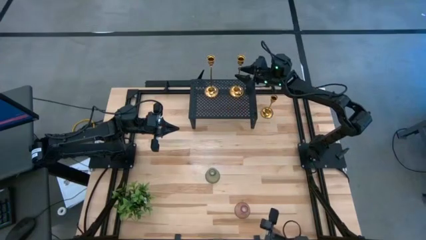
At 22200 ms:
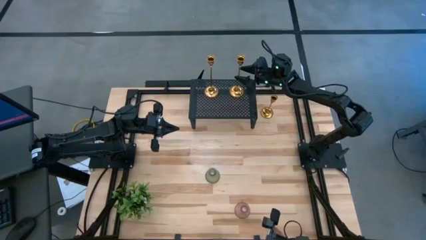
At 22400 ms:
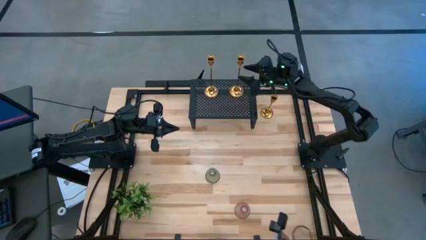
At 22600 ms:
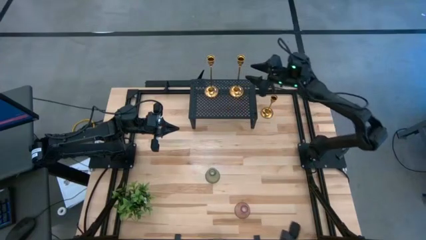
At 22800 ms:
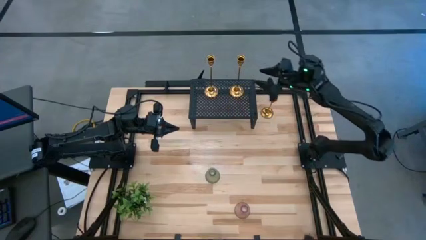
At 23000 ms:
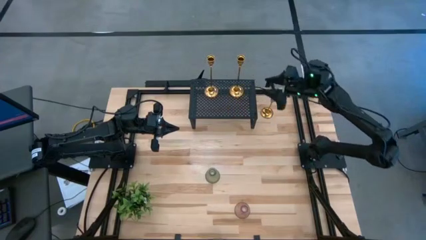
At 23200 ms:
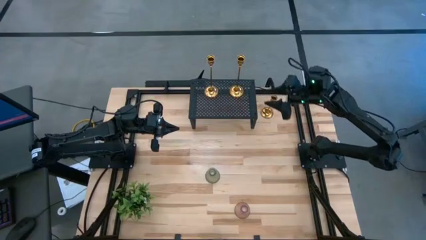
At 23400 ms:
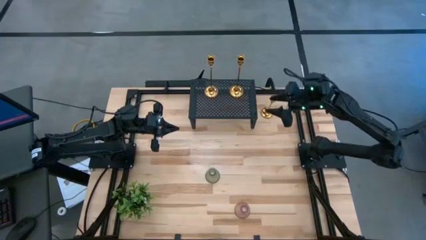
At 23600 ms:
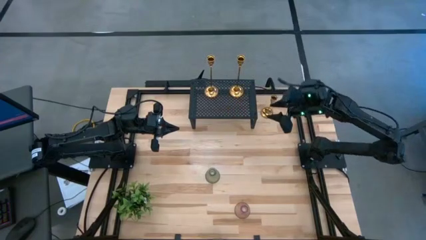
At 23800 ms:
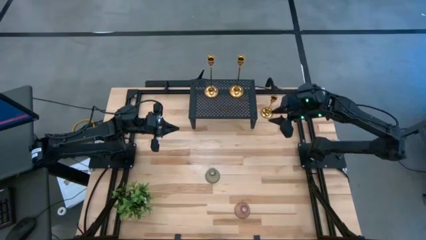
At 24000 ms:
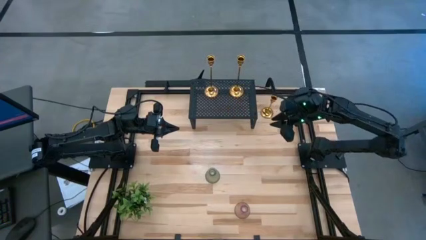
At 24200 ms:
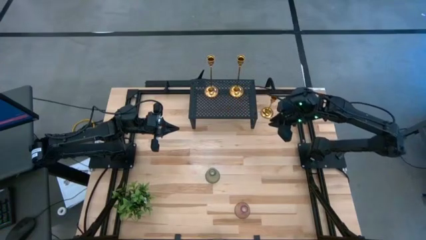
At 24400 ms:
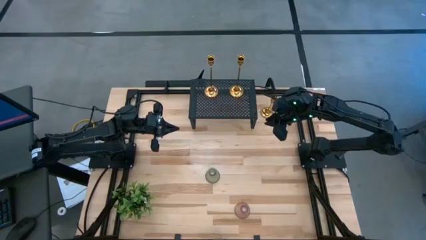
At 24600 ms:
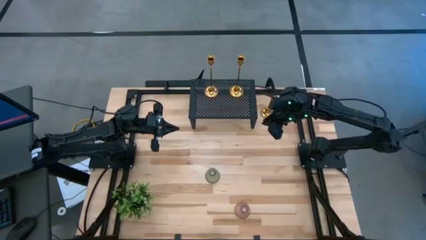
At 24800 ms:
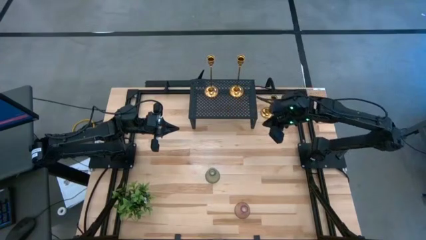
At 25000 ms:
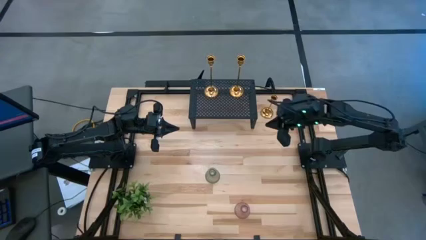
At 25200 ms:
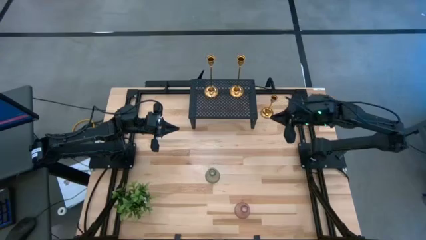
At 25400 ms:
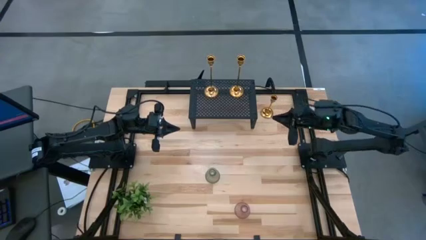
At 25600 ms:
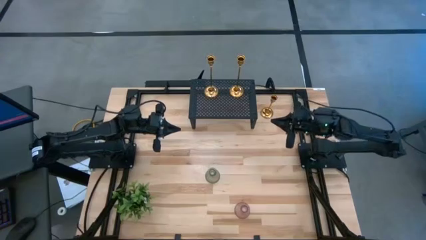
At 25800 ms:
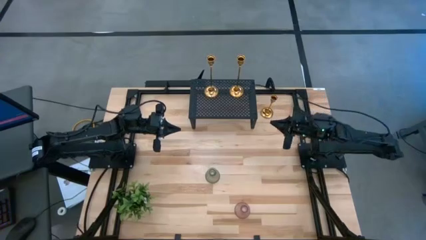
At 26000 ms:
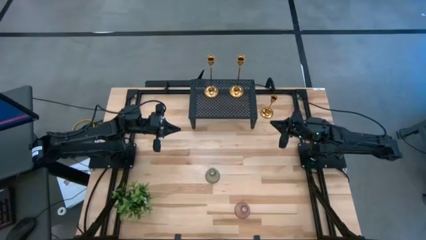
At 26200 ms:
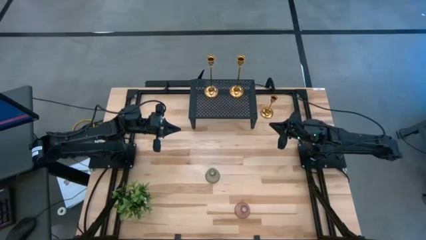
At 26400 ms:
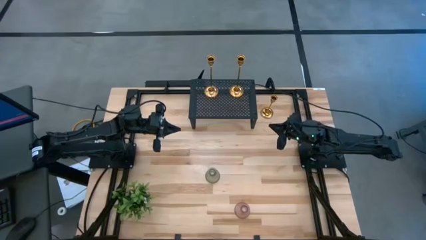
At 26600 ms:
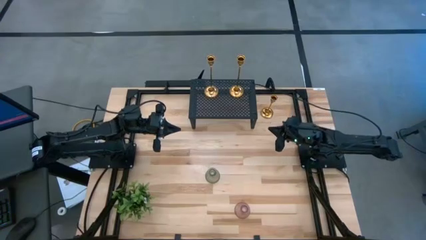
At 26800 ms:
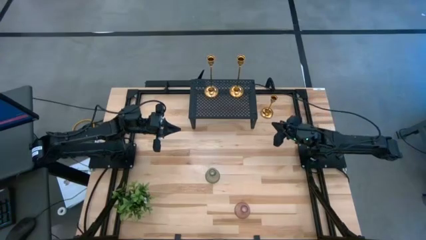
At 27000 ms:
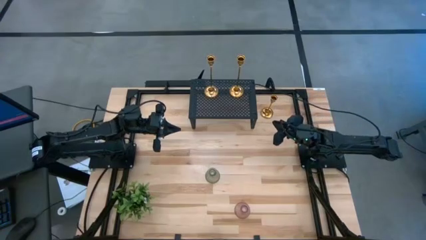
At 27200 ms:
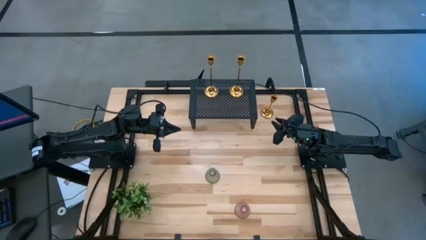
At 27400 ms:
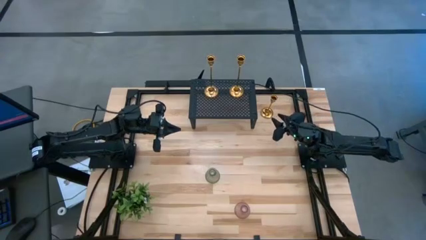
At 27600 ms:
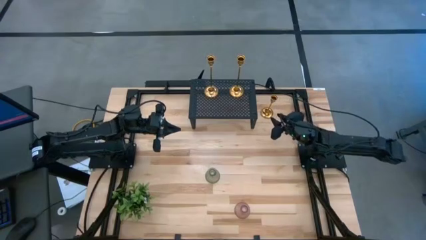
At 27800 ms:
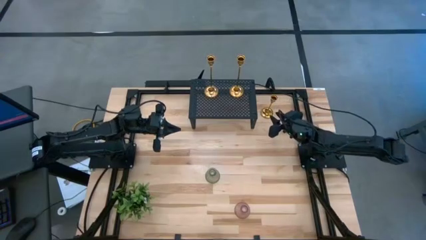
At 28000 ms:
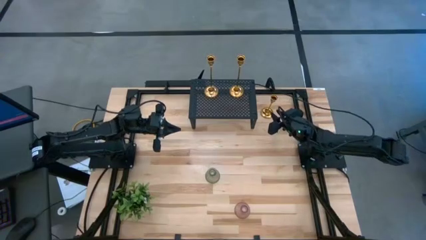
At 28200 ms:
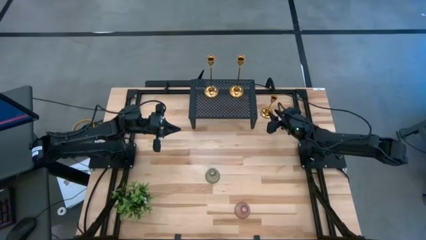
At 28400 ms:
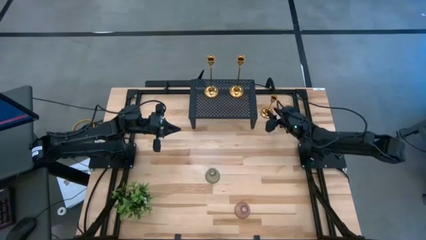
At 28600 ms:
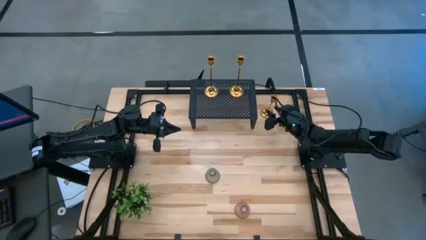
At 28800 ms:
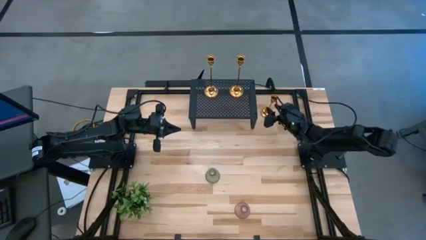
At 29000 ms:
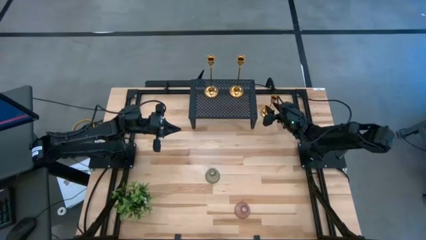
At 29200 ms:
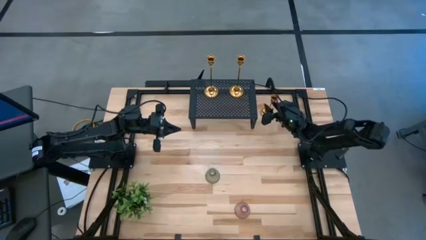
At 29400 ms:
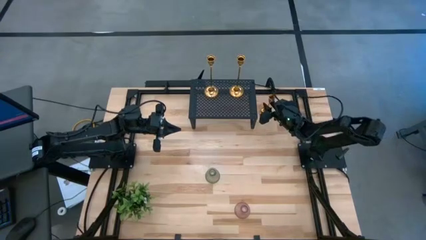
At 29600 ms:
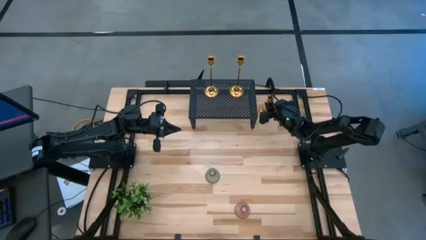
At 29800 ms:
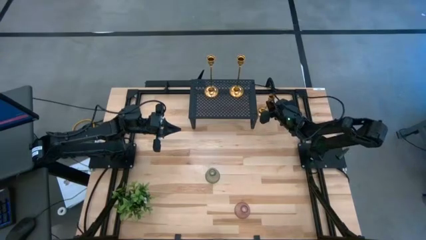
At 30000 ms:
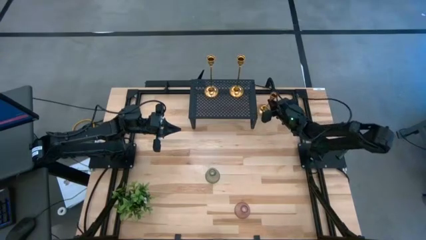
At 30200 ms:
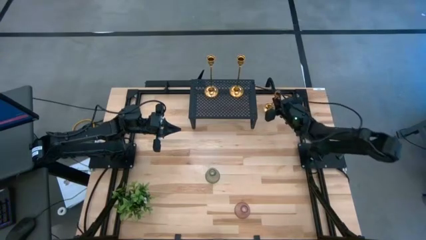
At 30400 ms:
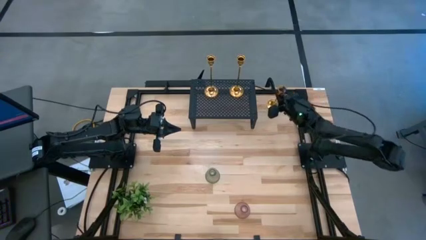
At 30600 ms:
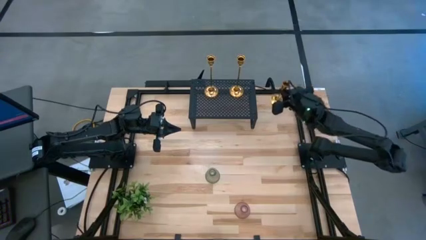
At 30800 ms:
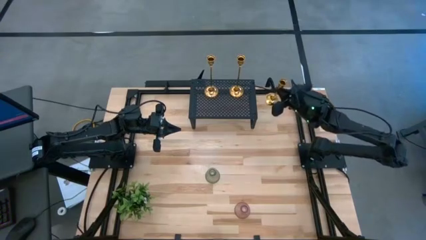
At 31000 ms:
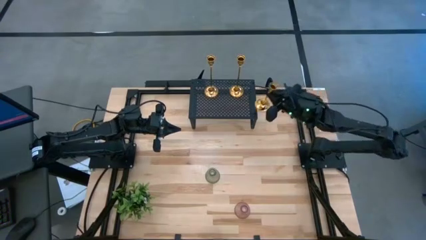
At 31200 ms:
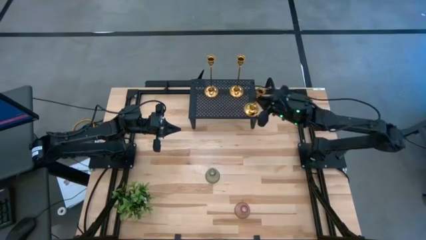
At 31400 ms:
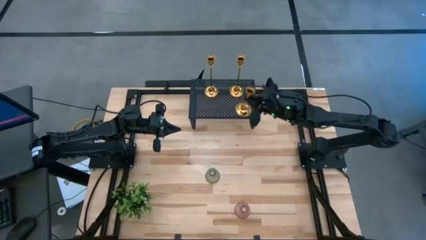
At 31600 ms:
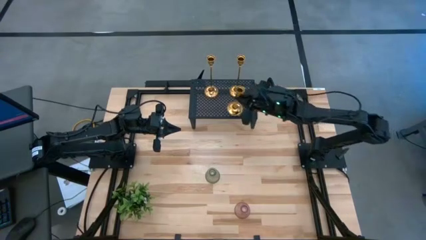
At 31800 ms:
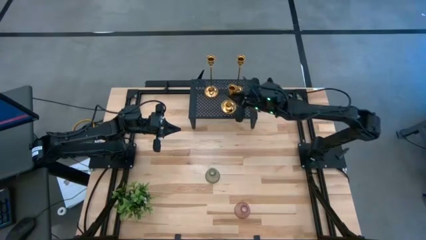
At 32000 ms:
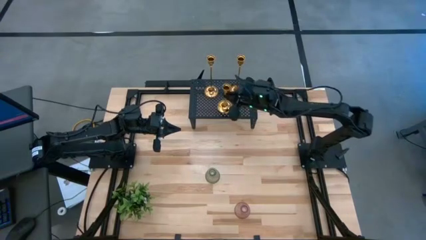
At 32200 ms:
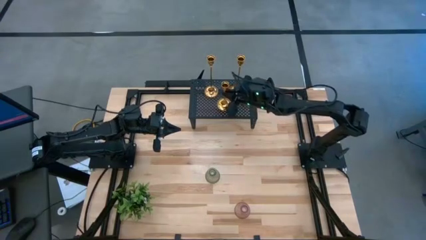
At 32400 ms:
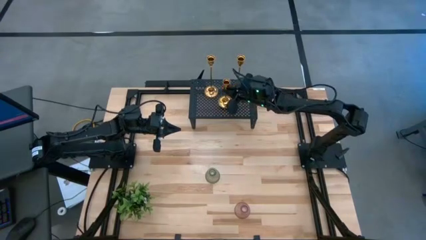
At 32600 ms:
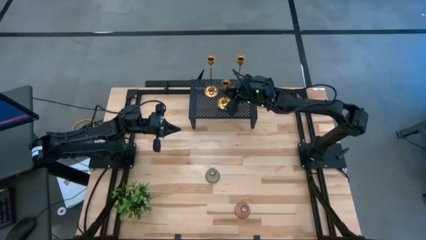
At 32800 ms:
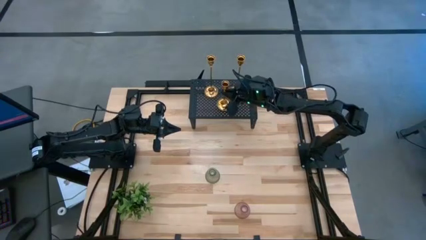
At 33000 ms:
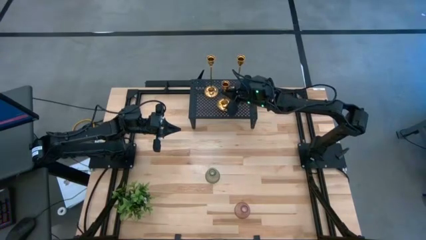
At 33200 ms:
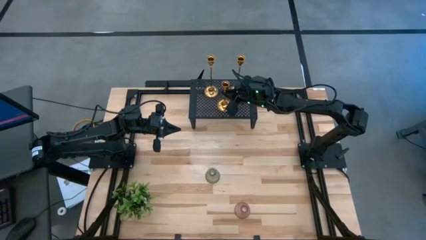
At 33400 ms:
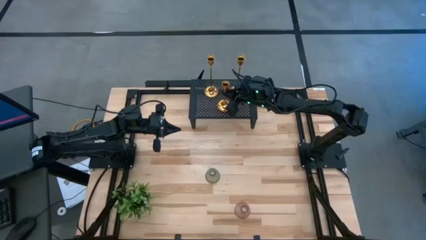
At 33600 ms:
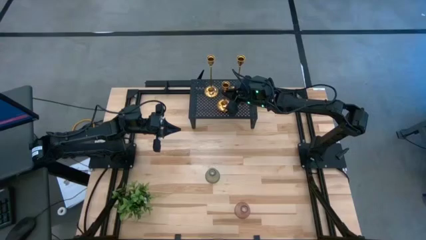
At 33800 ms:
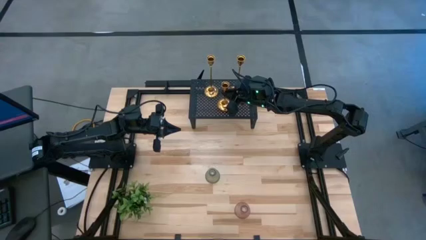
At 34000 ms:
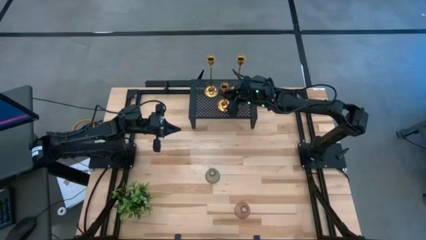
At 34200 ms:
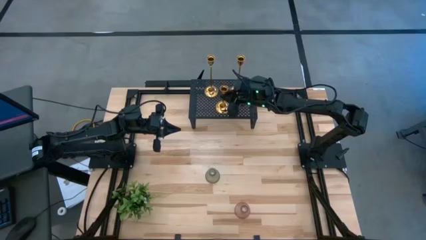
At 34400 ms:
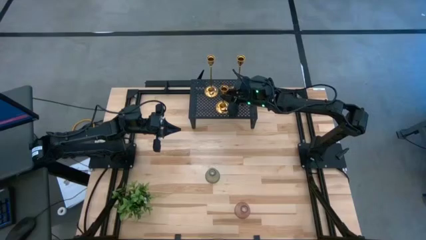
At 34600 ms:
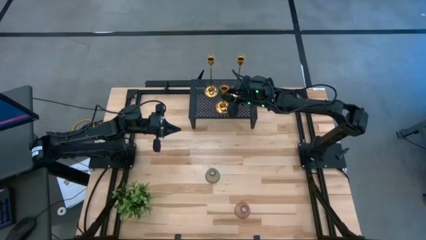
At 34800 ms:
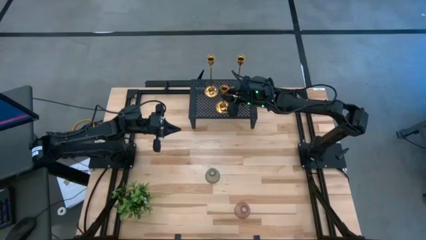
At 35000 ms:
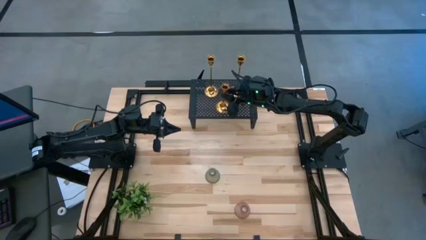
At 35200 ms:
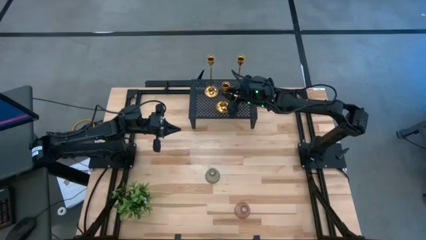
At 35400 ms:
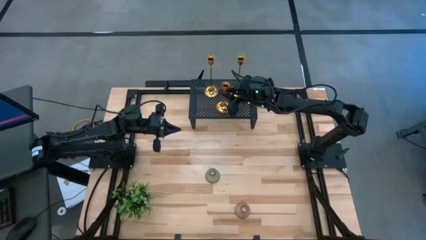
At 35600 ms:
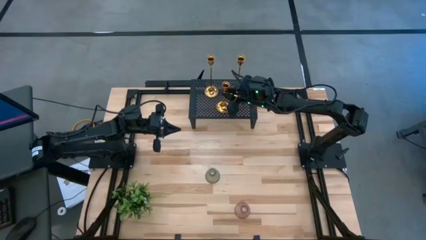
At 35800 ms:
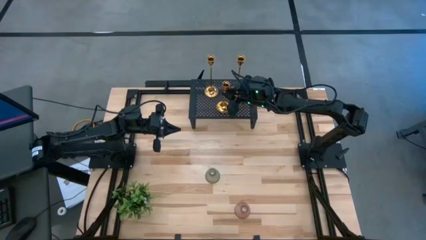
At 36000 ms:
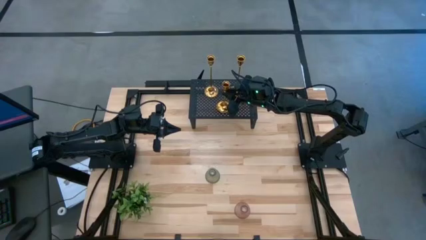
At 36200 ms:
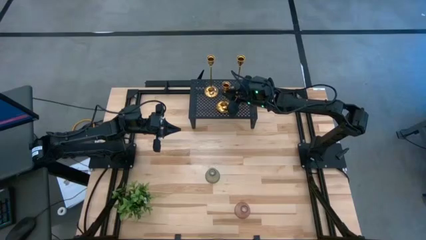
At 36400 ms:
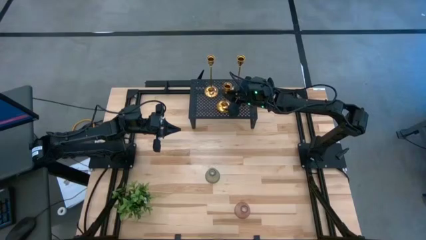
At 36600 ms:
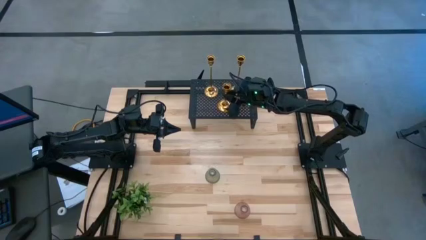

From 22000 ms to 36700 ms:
Task: Pick & Place candle stick holders
Put the gold candle holder on the shelf
